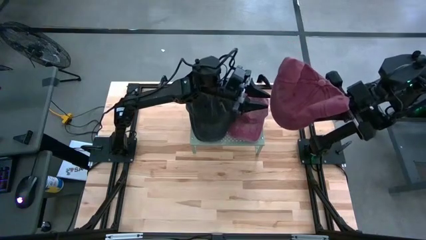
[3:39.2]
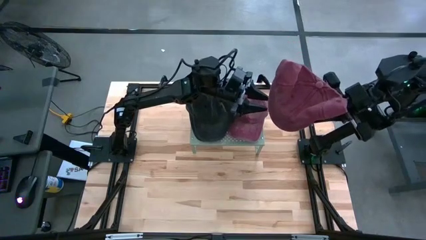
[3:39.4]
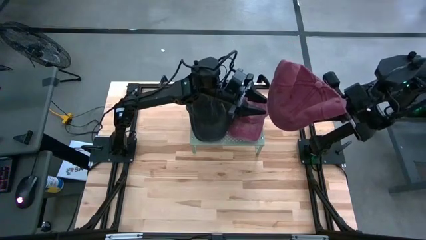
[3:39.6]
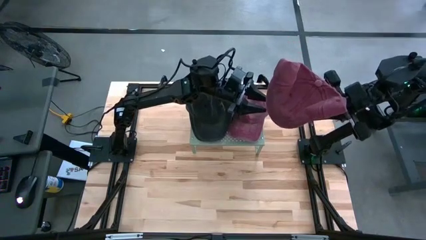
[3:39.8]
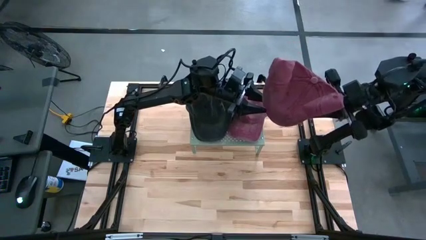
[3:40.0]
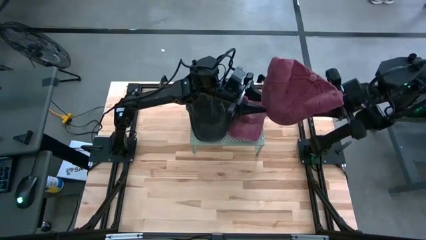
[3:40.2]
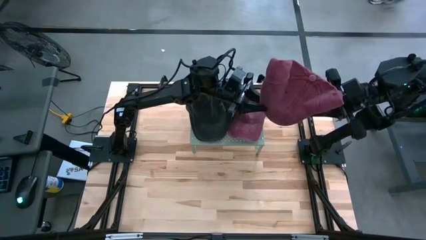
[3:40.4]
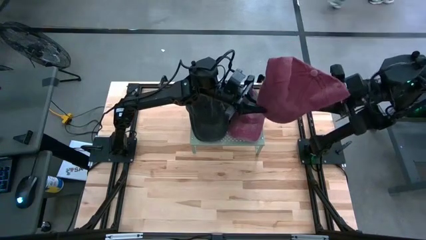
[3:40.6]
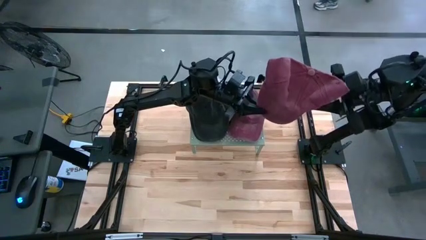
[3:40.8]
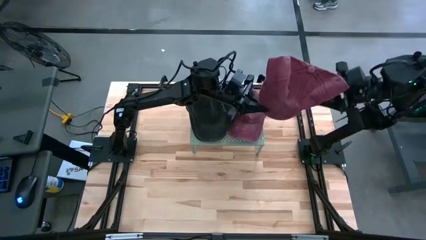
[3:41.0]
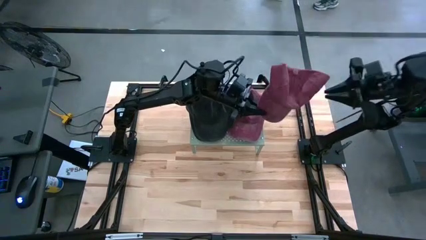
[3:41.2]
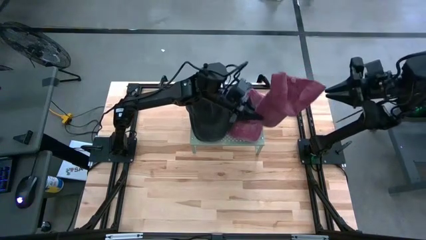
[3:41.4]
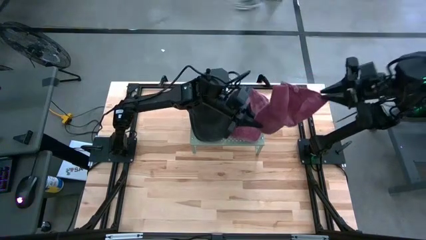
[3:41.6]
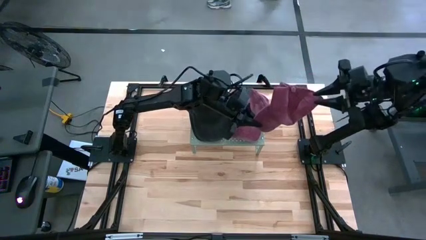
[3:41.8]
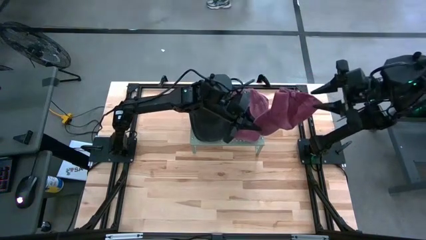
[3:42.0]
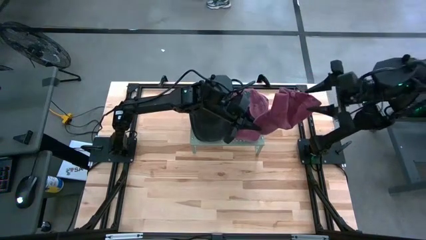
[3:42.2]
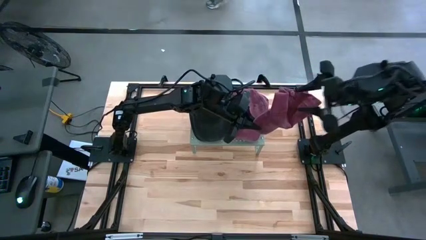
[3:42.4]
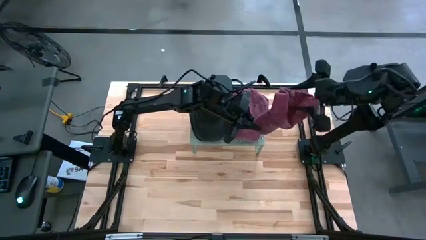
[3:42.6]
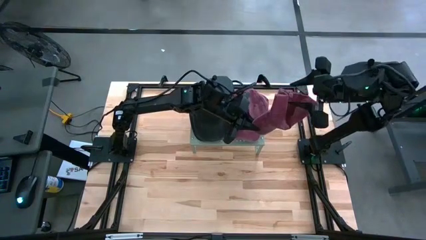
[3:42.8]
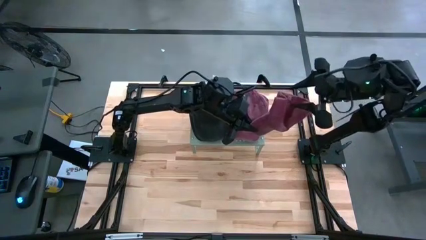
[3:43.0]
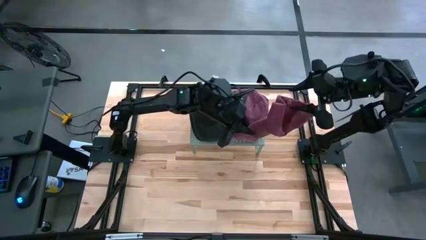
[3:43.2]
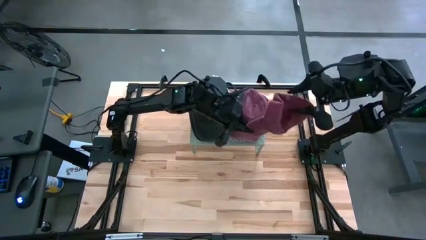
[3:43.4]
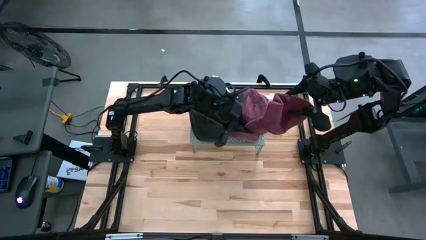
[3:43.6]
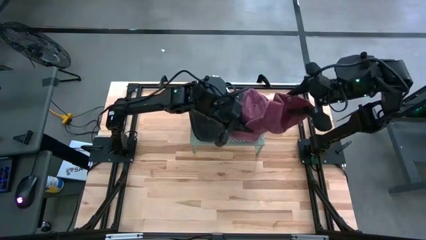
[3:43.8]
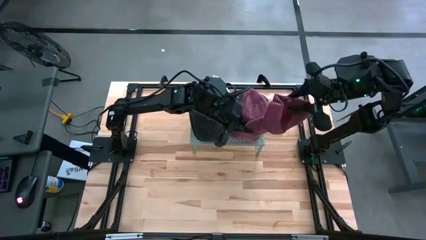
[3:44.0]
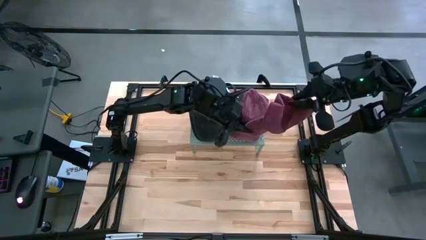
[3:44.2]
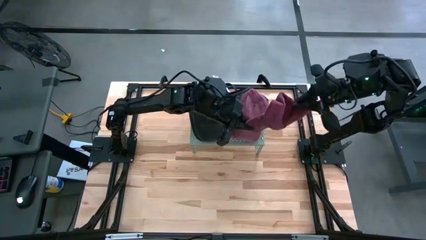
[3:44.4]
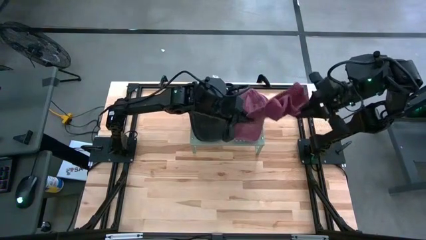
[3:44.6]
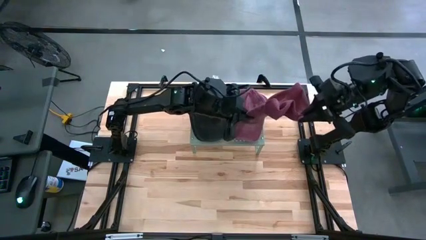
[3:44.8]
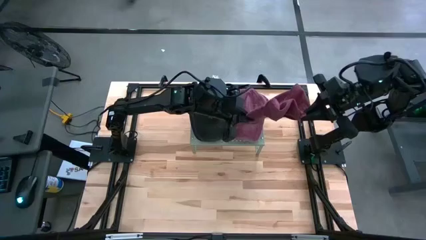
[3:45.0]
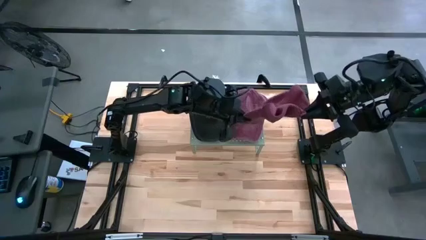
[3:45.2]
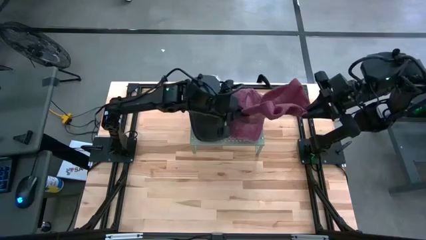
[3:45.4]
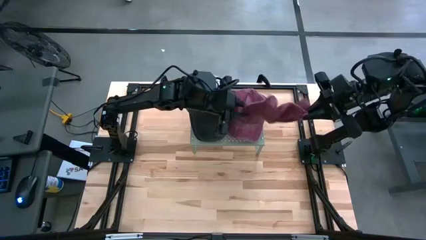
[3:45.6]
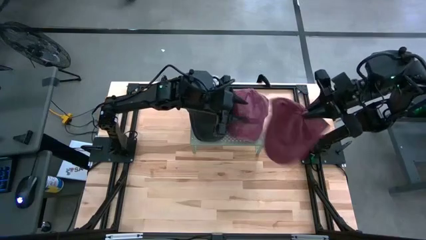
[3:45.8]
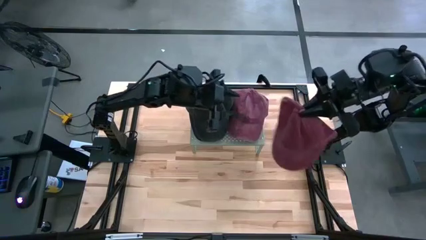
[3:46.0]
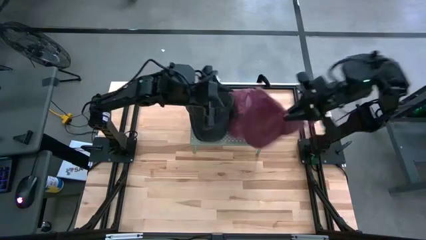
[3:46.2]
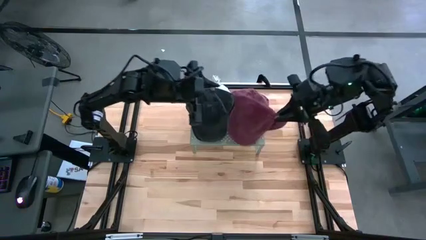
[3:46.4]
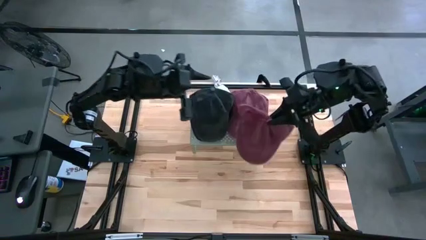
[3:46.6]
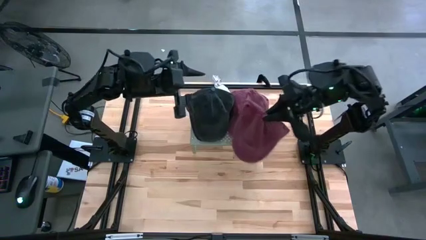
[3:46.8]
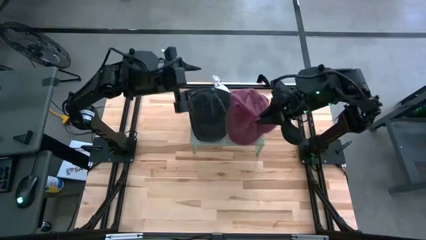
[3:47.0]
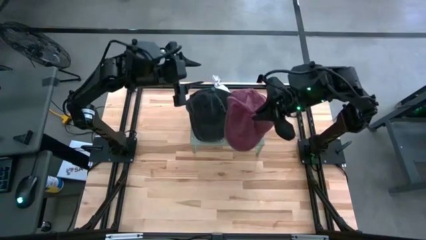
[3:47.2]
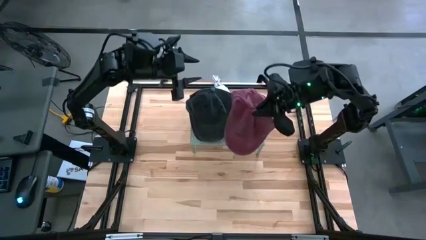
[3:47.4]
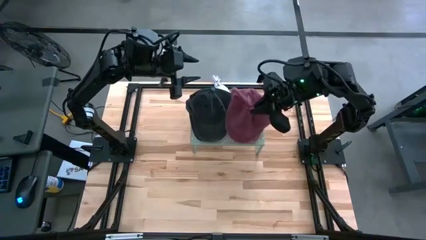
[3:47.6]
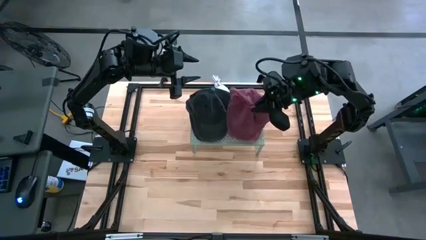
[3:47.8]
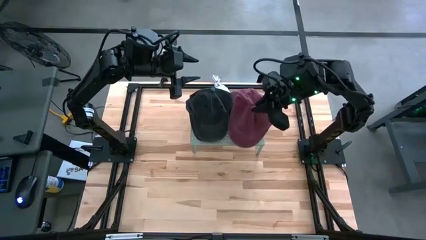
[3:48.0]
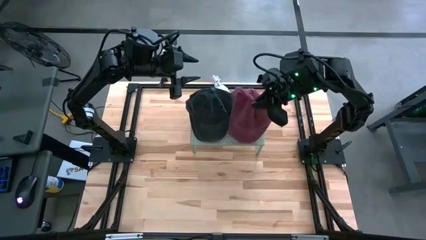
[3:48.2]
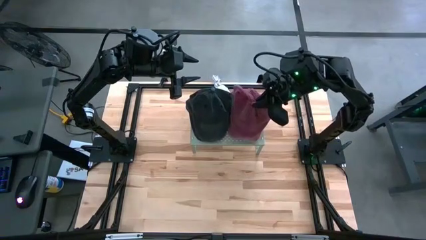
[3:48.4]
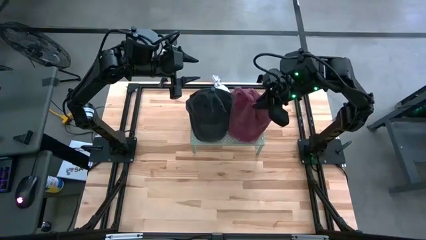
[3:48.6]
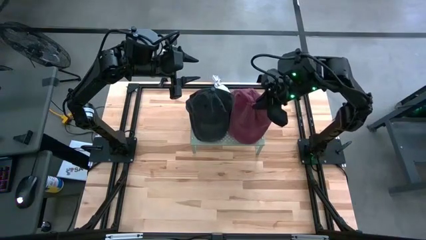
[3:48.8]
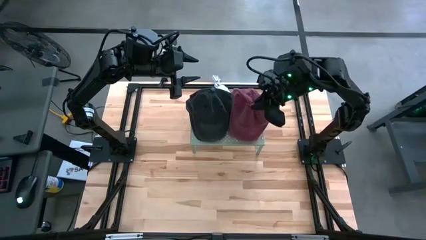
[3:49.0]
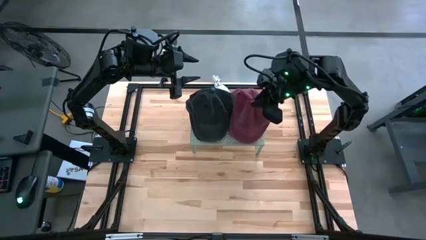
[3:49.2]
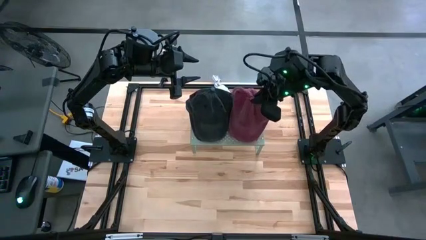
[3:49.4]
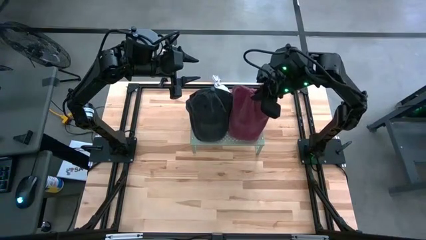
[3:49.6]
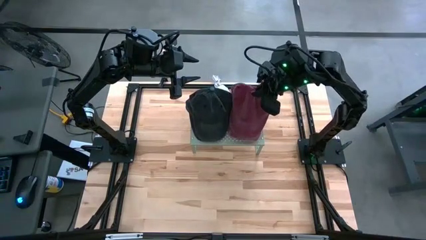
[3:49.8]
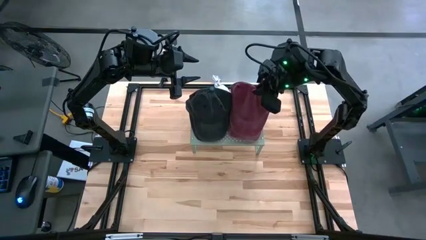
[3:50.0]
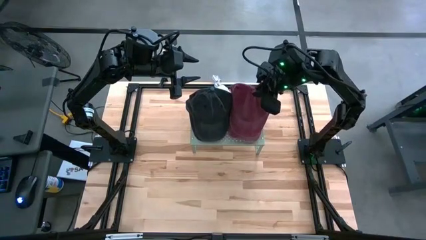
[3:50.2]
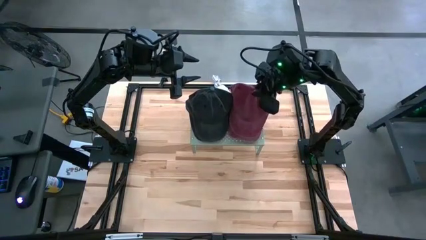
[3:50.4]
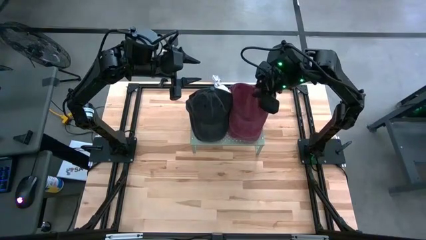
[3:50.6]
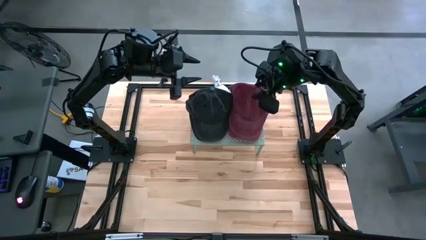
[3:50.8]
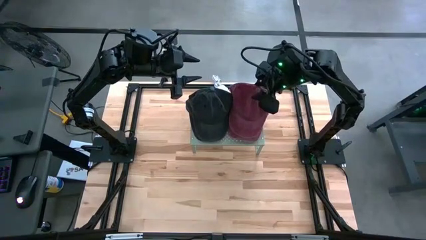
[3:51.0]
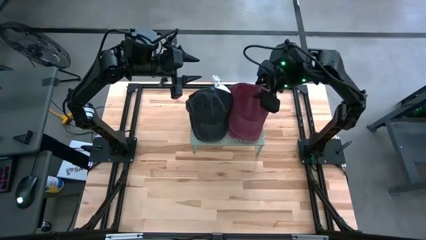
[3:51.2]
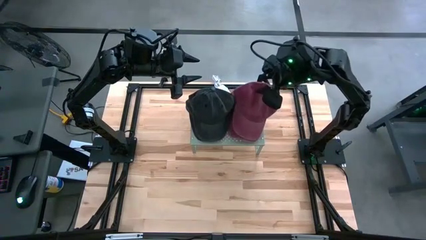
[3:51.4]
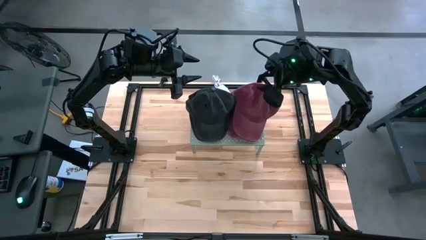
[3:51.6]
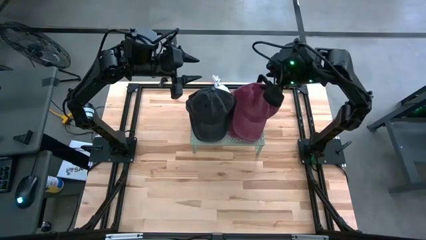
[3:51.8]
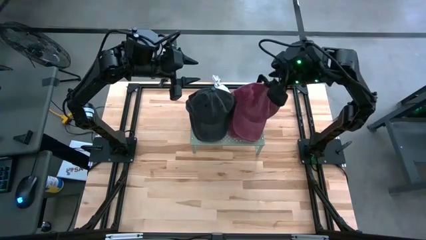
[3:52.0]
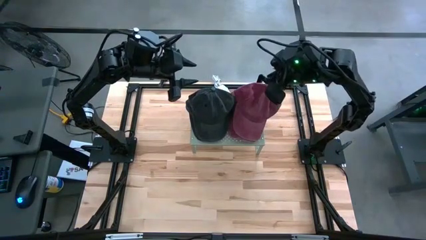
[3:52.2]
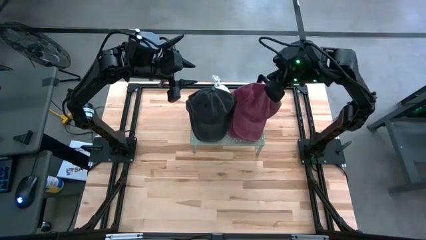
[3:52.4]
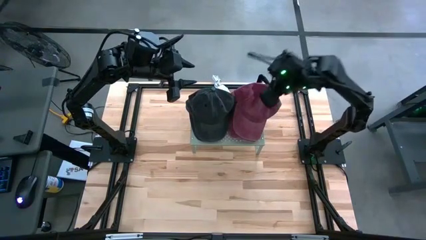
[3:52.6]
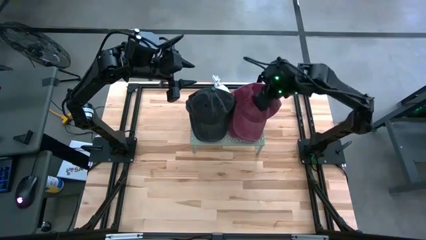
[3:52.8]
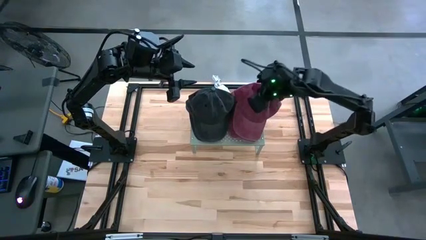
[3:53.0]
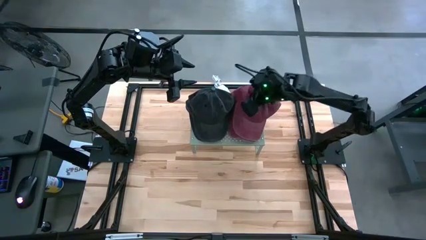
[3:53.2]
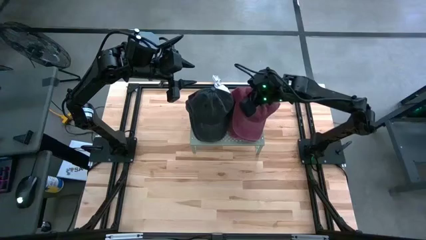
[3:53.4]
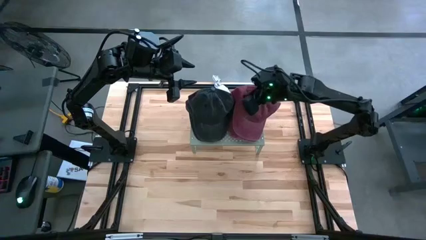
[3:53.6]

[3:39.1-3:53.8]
Task: Pick & Place hat
Stack the red cap on top of the red cap on the shelf

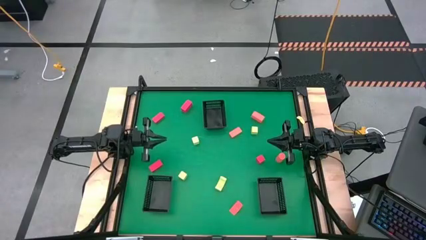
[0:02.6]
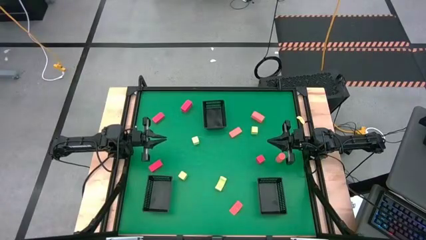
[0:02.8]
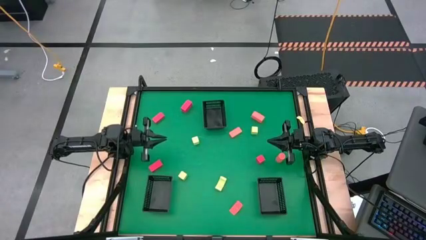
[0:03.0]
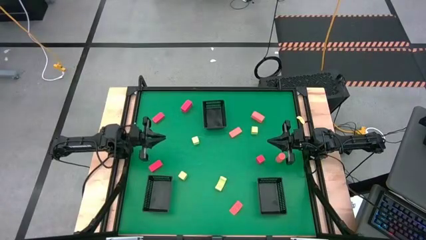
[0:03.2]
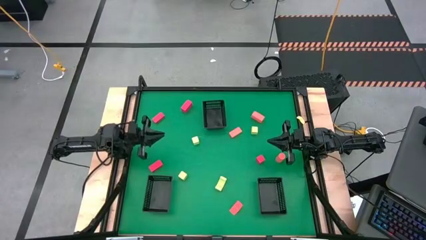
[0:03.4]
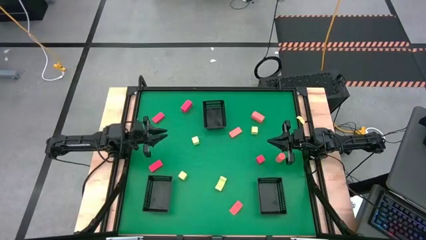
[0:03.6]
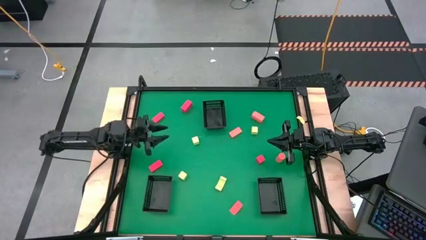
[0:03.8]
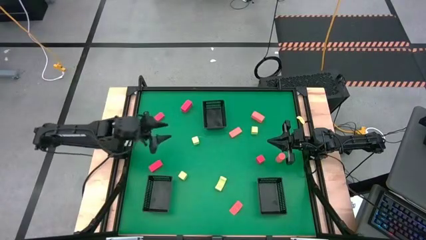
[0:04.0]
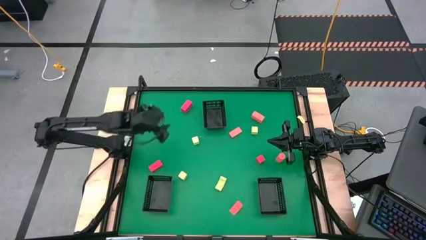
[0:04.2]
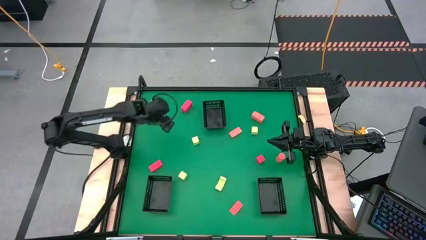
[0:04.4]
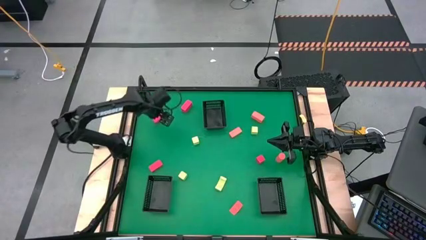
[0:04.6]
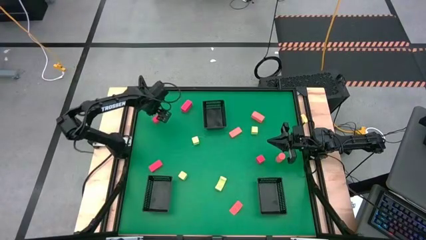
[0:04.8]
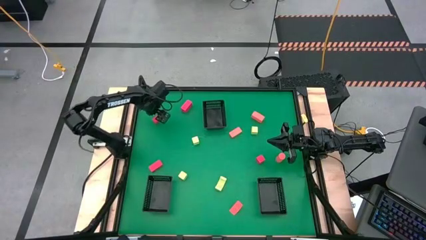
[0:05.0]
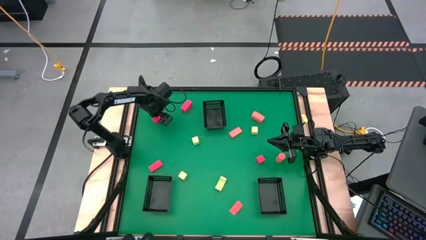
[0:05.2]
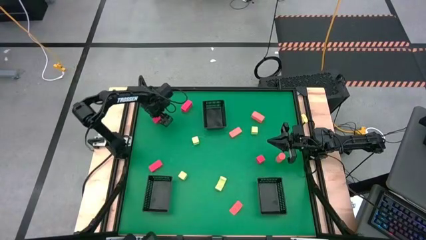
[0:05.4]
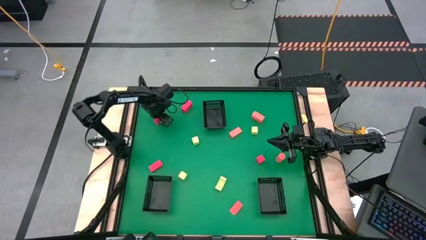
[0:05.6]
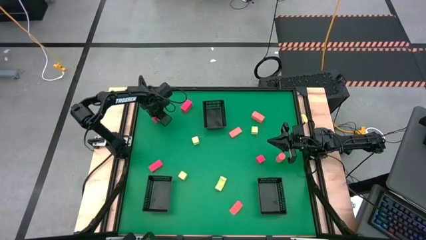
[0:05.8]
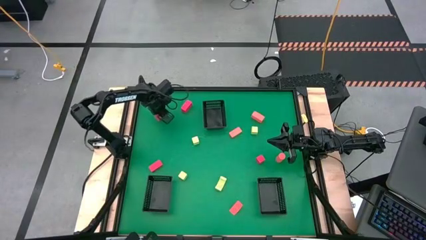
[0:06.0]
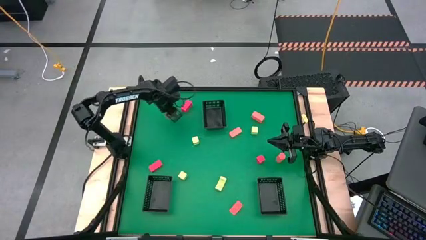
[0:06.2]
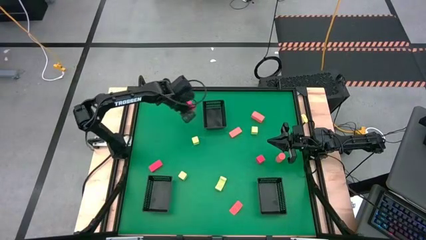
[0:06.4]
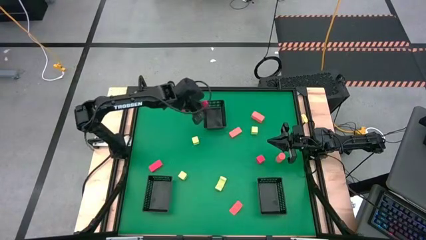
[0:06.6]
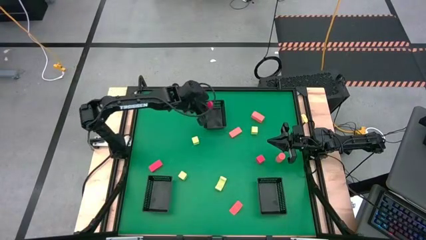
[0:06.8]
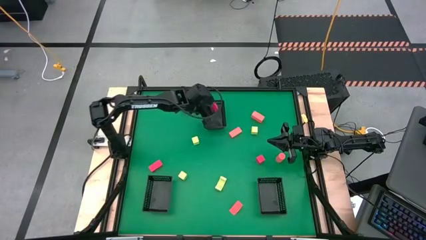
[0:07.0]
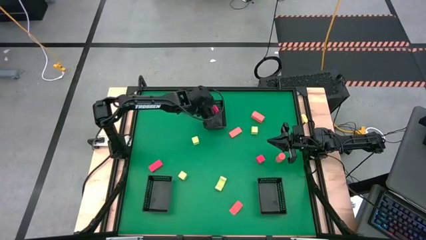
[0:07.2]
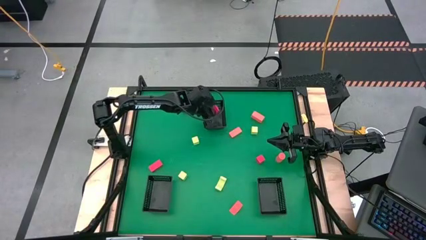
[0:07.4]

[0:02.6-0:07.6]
Task: Sort & place blocks by color
Put the red block into the top black bin
